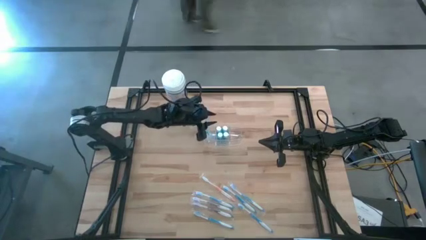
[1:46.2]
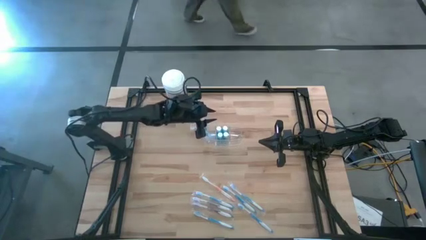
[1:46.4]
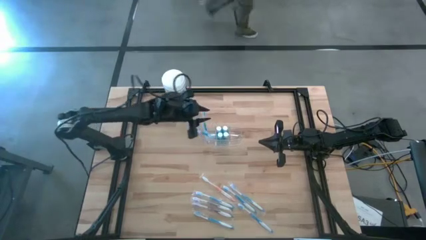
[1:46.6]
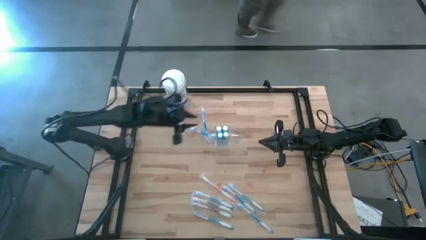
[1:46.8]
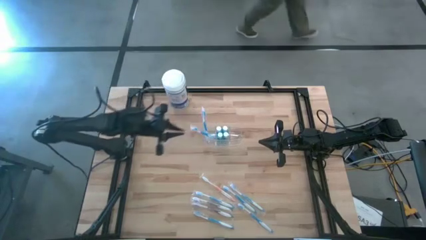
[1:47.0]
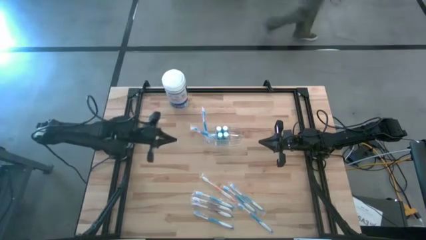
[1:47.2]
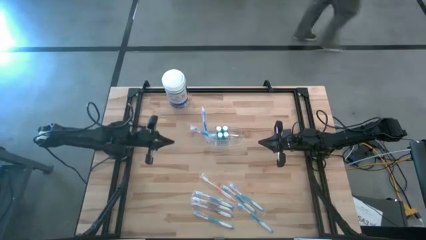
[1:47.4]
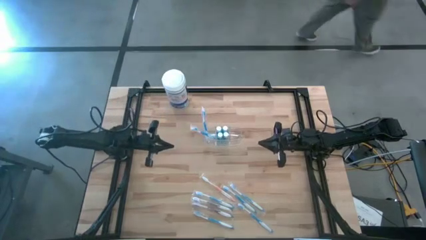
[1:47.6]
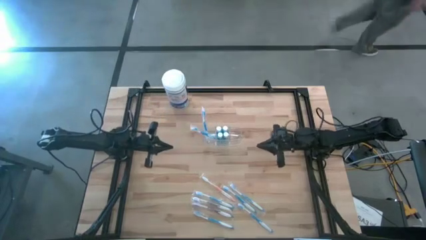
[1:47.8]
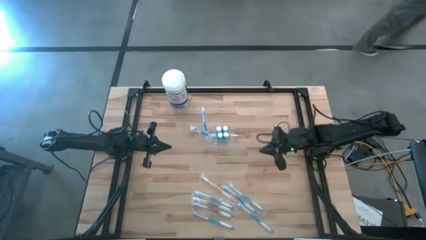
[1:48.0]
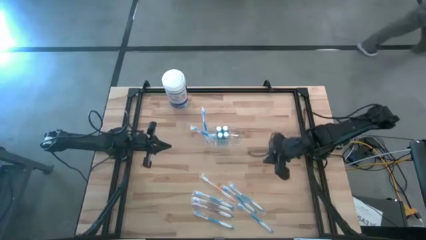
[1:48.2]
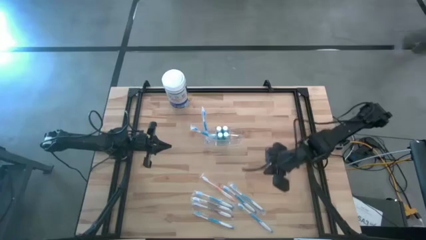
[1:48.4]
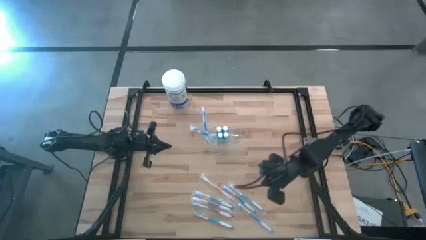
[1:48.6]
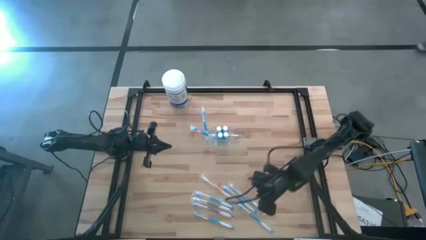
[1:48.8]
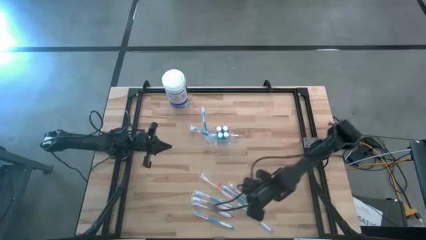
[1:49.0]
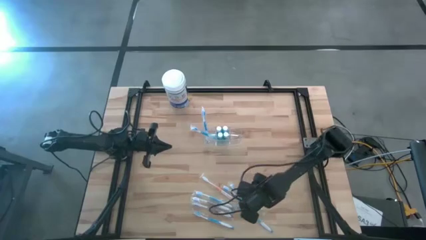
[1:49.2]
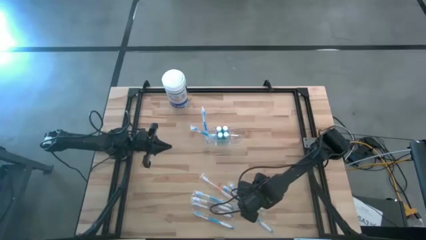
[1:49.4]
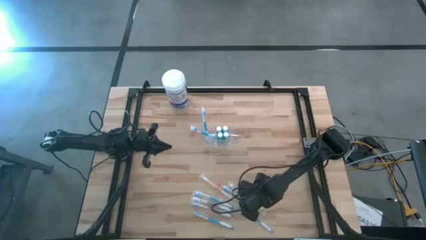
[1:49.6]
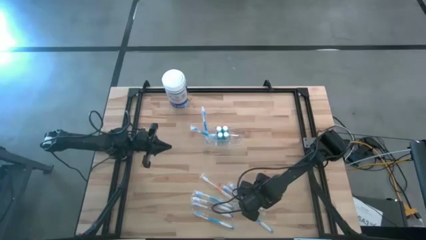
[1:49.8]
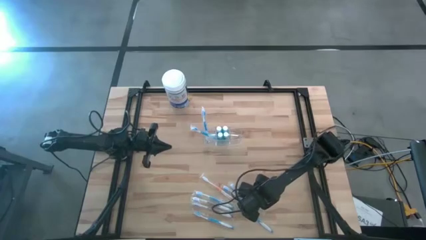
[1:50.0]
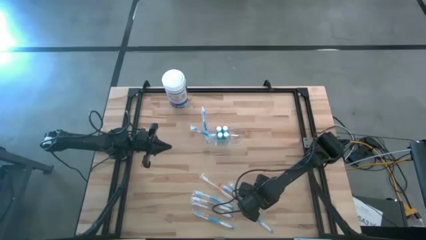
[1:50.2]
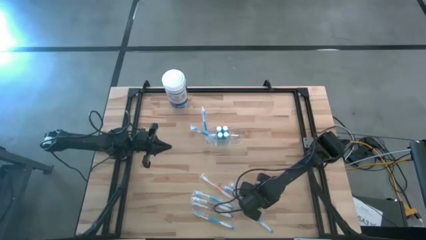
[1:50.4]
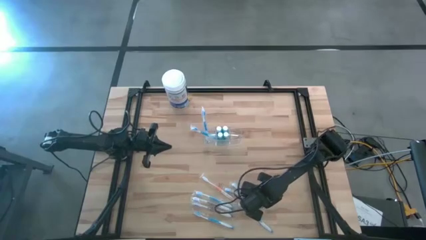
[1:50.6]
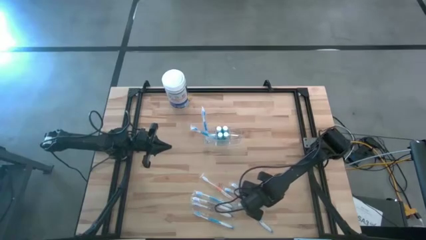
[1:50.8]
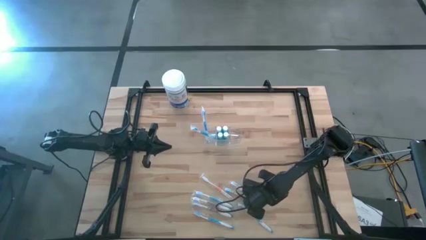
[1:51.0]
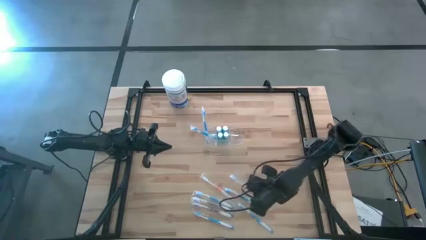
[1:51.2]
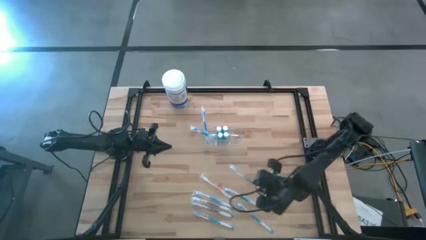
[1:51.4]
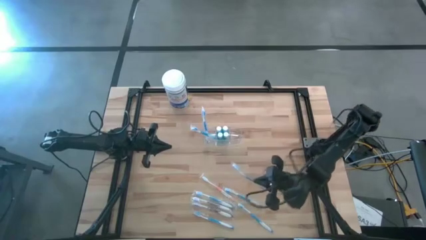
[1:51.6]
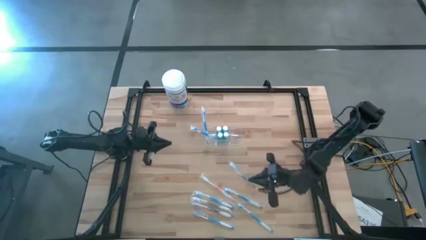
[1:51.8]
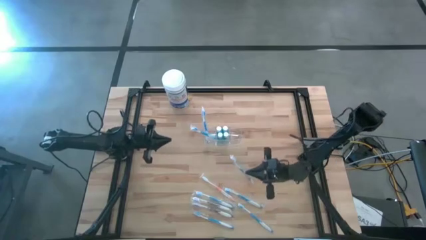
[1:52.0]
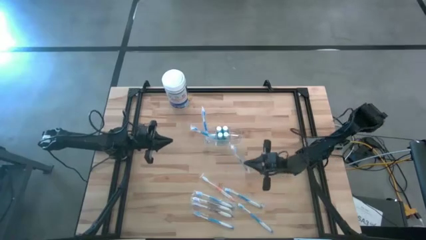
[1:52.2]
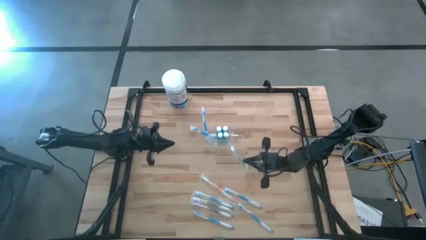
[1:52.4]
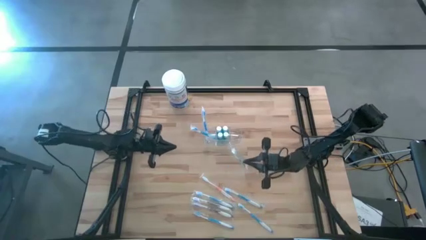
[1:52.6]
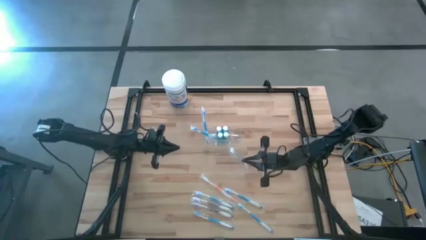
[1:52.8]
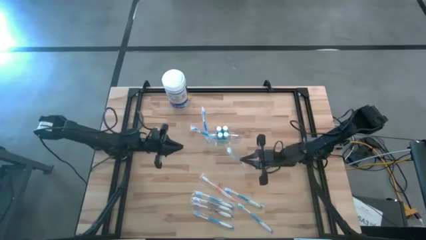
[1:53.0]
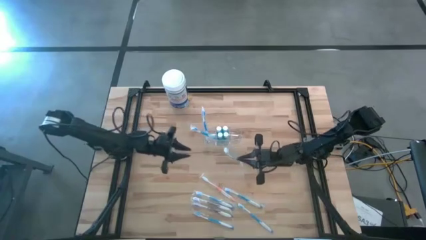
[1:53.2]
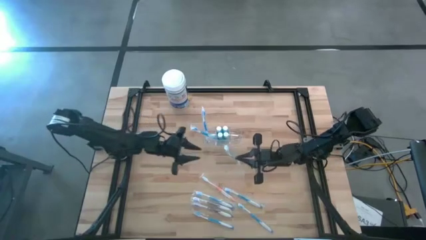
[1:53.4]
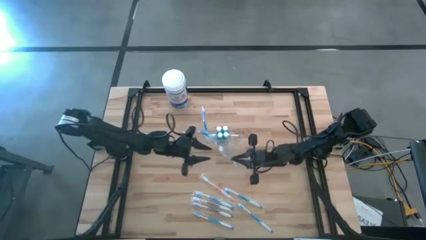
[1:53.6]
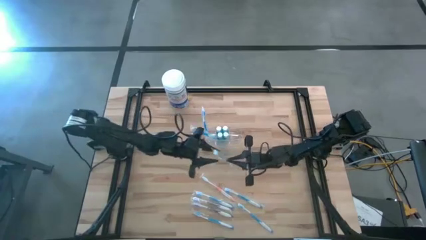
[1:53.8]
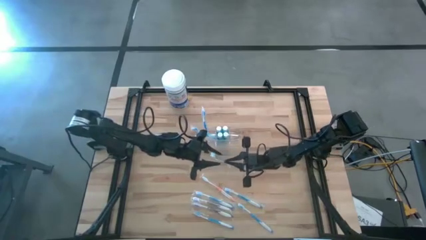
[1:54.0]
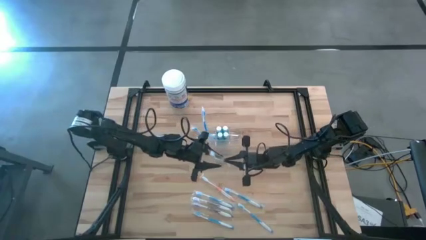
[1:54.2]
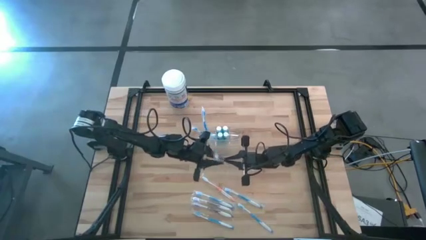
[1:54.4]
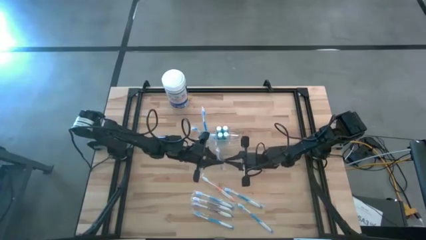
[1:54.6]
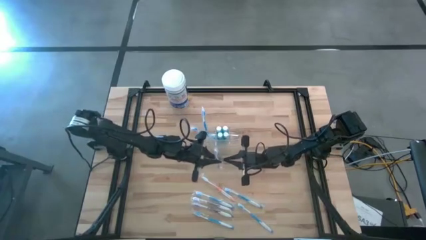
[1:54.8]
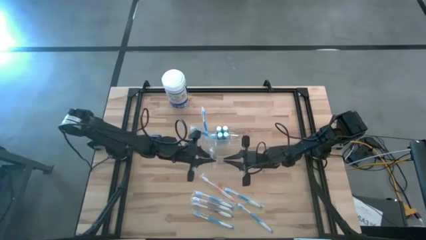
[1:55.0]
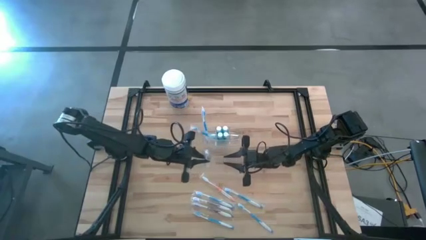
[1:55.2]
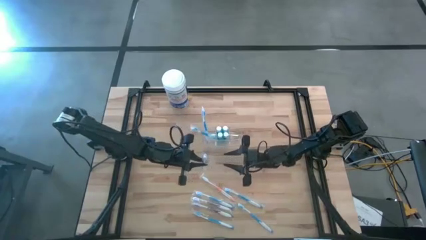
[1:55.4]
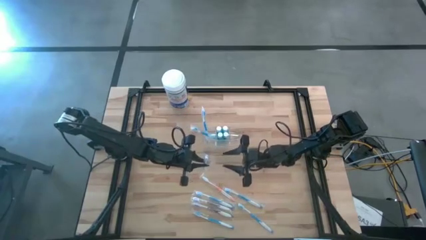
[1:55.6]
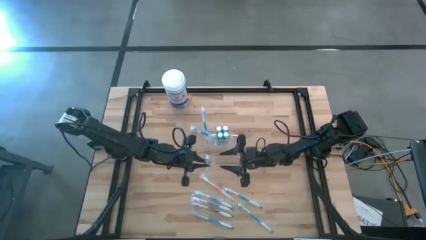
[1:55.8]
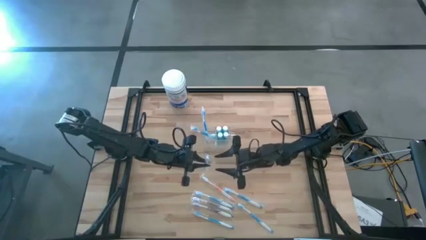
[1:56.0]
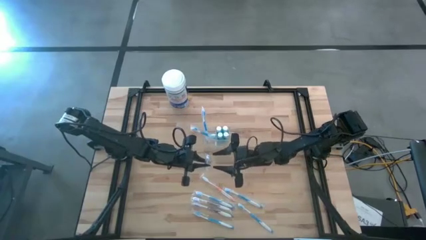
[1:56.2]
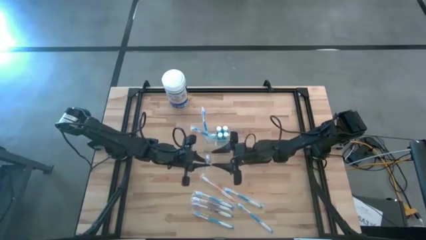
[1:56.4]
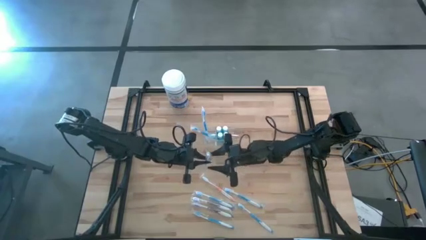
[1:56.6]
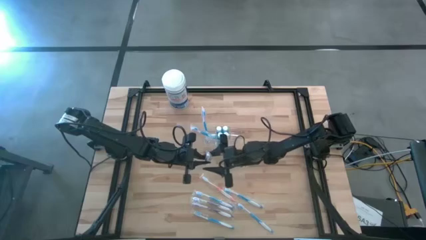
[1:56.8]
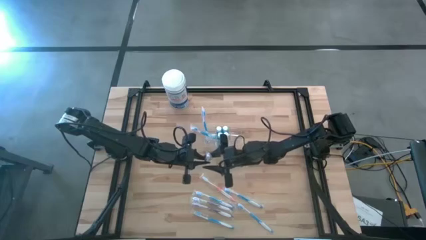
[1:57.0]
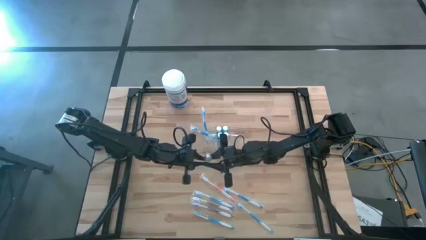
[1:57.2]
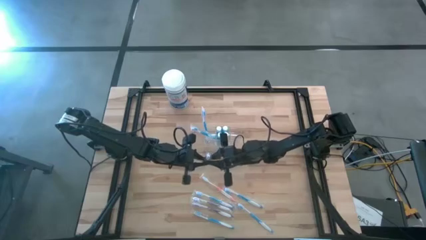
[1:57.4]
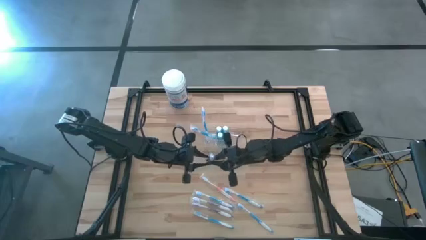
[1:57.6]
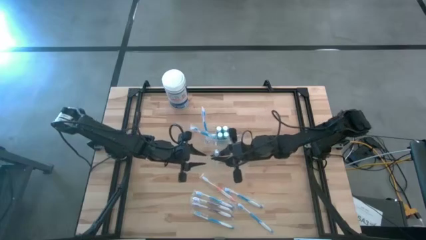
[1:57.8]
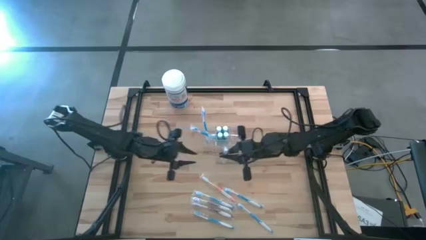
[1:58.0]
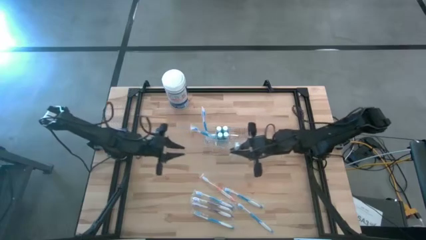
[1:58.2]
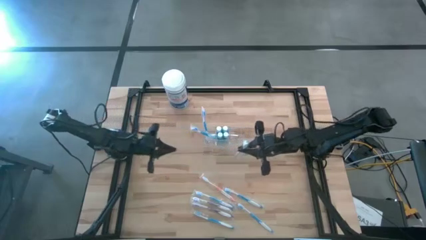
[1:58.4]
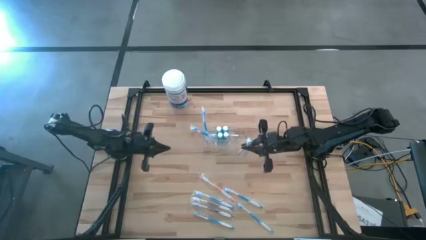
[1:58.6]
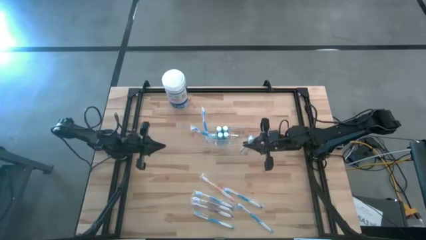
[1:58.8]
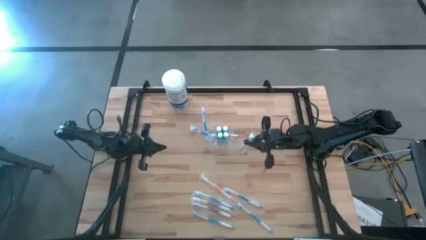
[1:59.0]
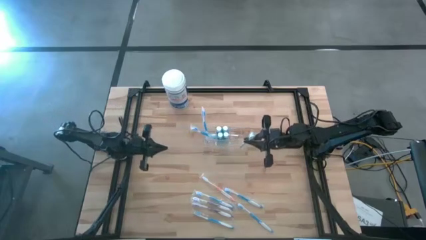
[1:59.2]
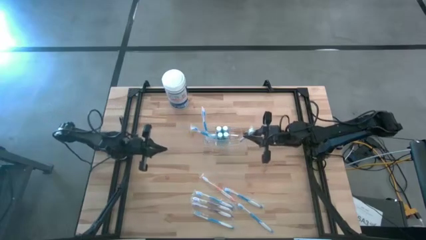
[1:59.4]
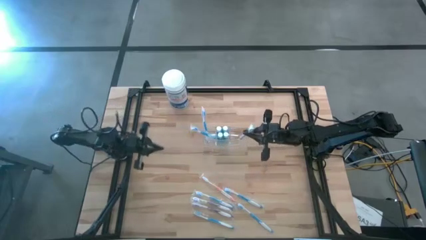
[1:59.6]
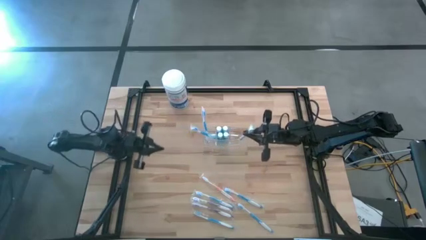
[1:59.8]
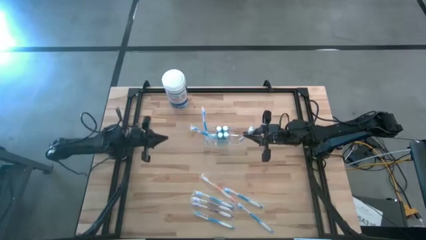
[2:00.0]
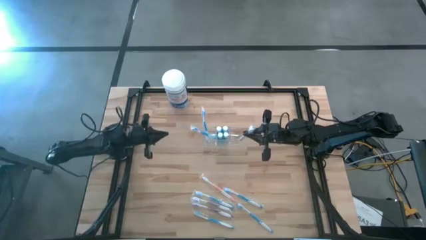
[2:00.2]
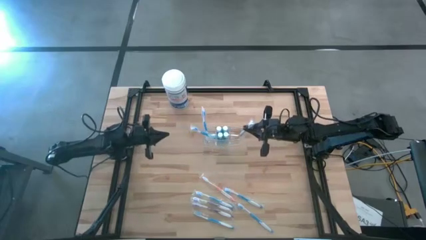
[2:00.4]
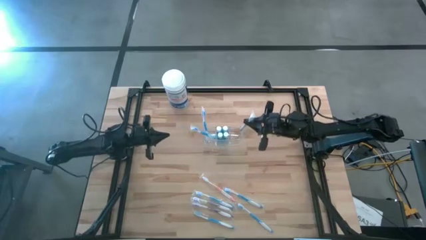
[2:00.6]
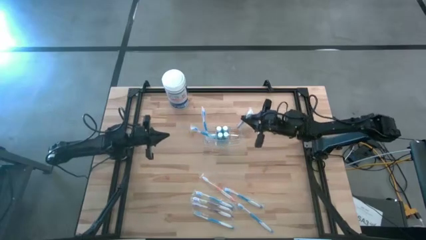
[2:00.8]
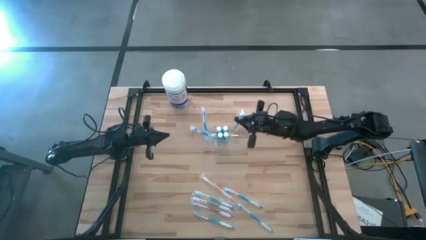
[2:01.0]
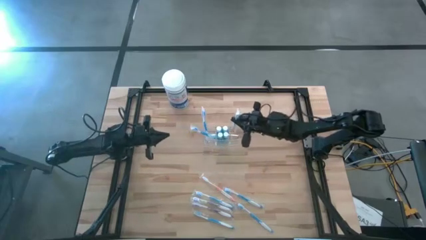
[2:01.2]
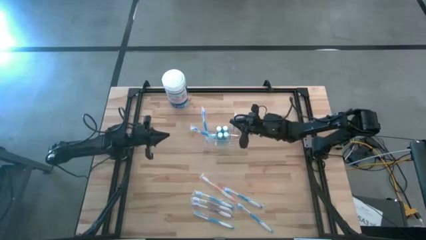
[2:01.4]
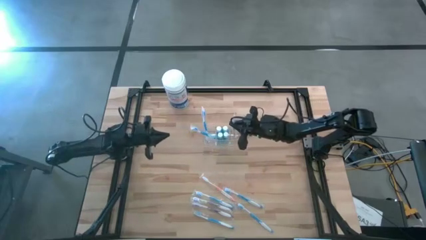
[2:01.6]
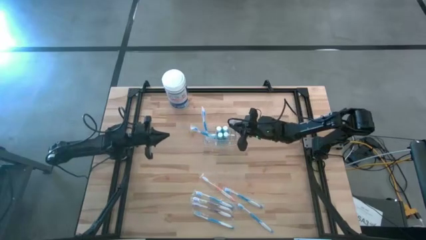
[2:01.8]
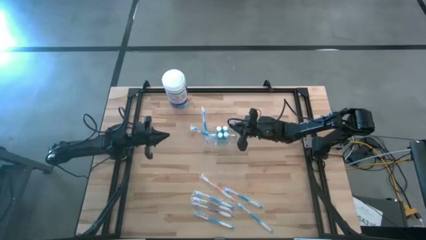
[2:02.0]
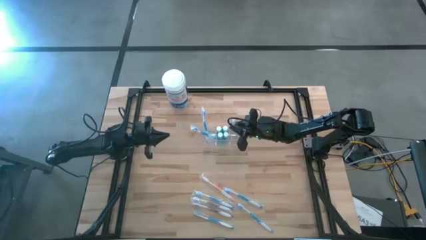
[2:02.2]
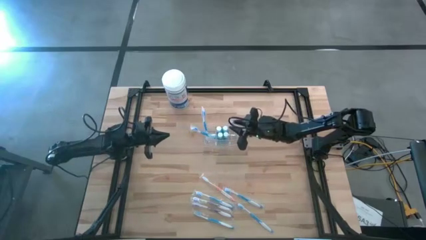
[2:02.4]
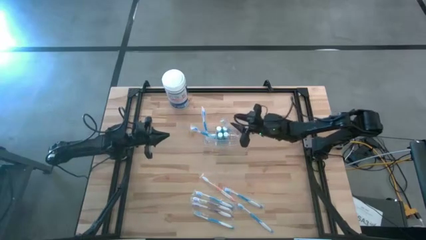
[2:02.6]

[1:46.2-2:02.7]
Task: Pick & Place toothbrushing station
Put the blue toothbrush in the transparent organizer
